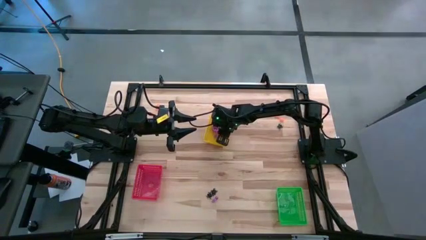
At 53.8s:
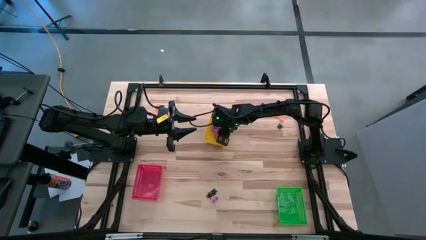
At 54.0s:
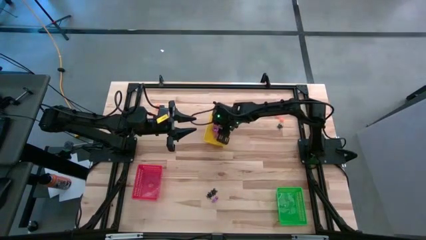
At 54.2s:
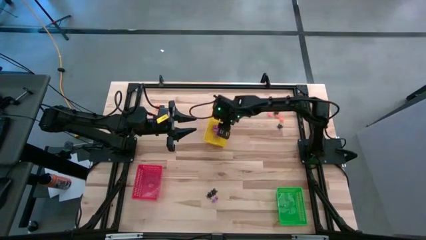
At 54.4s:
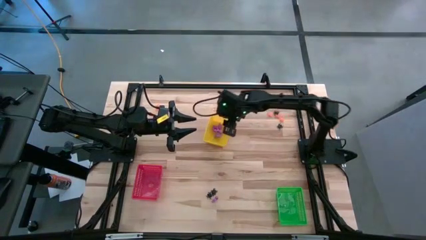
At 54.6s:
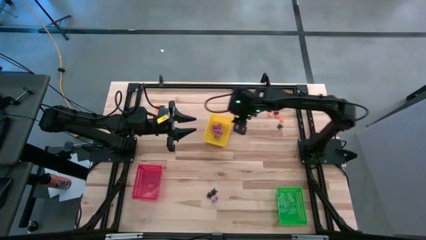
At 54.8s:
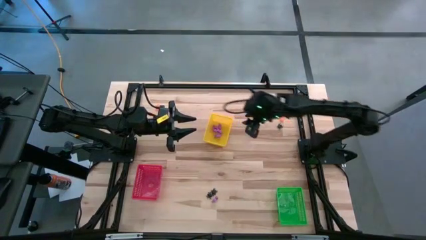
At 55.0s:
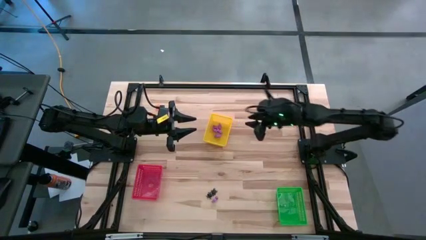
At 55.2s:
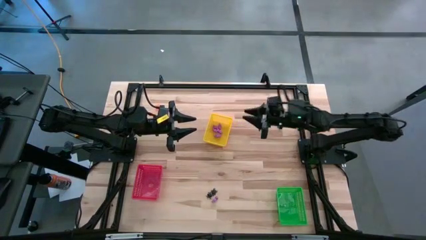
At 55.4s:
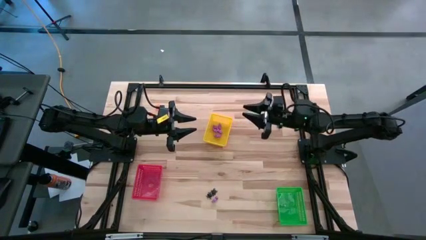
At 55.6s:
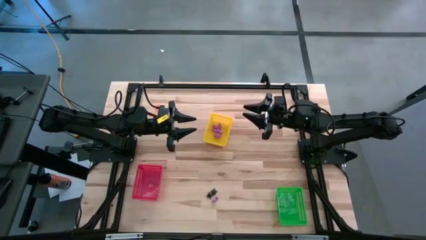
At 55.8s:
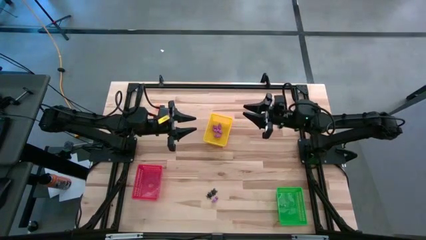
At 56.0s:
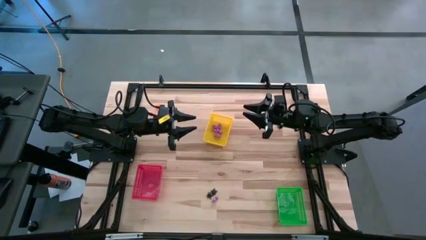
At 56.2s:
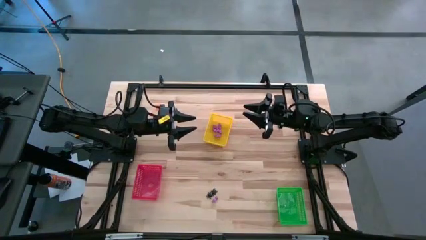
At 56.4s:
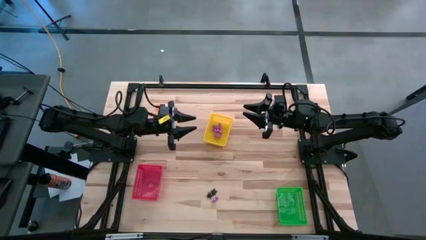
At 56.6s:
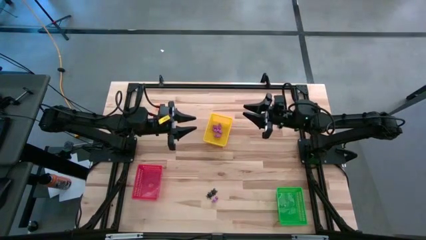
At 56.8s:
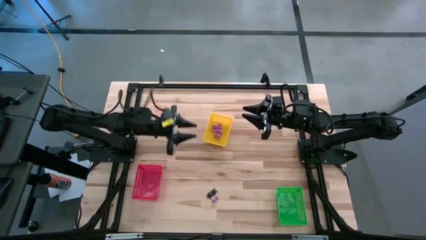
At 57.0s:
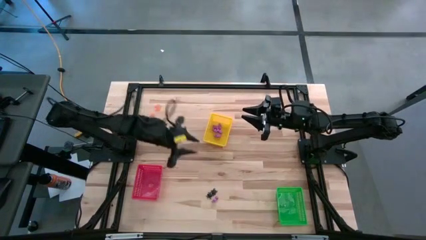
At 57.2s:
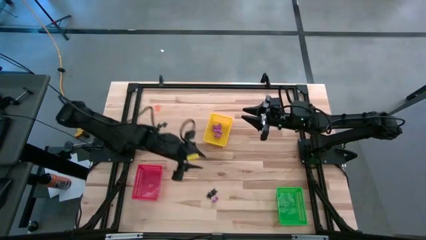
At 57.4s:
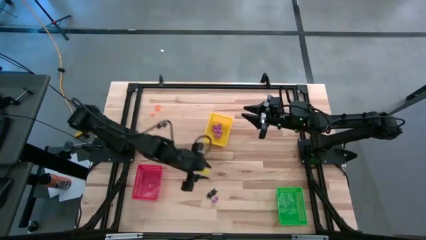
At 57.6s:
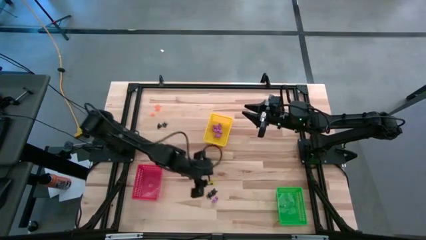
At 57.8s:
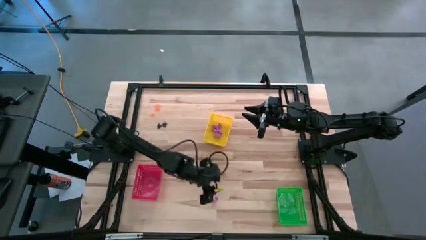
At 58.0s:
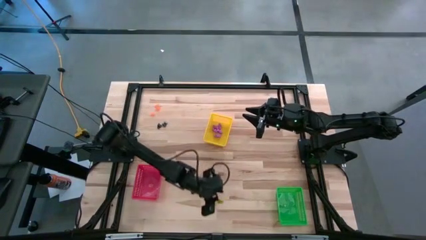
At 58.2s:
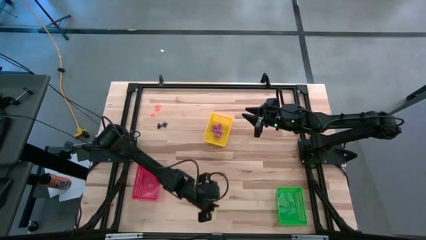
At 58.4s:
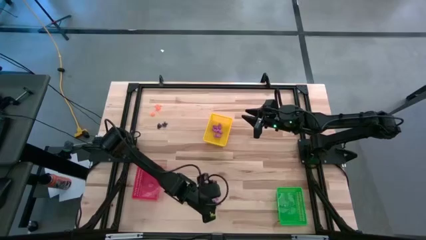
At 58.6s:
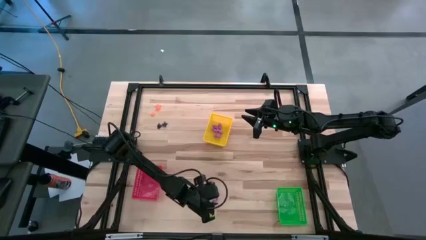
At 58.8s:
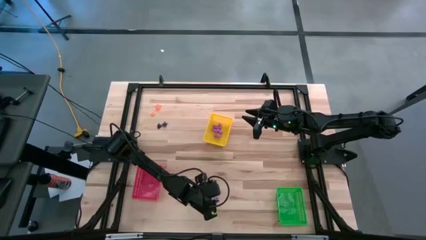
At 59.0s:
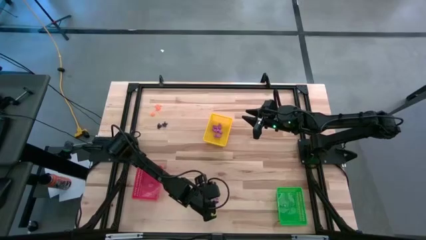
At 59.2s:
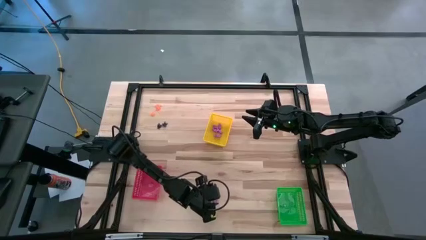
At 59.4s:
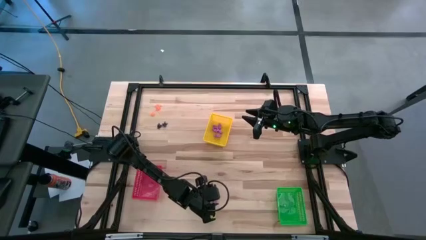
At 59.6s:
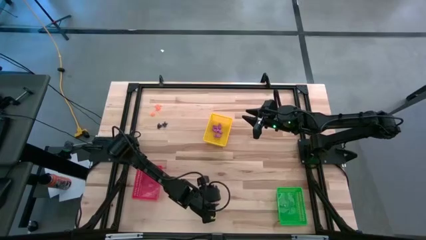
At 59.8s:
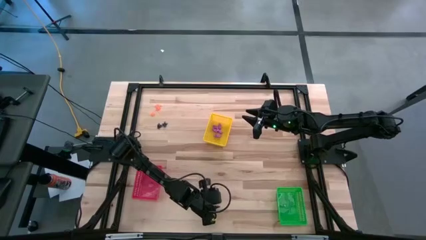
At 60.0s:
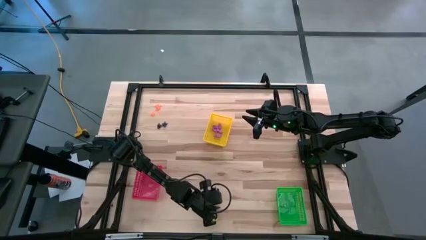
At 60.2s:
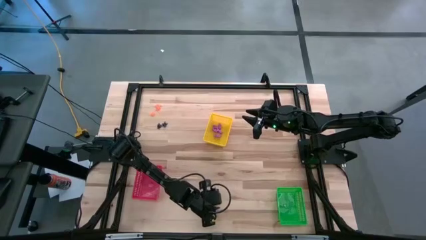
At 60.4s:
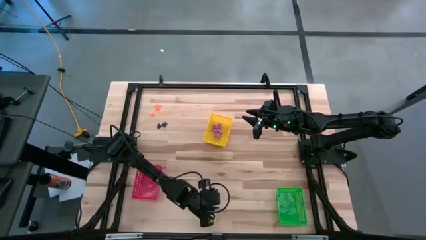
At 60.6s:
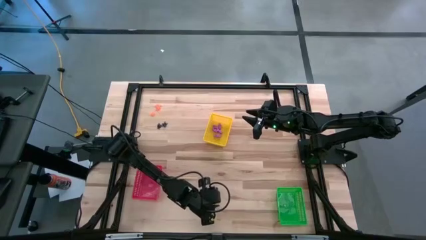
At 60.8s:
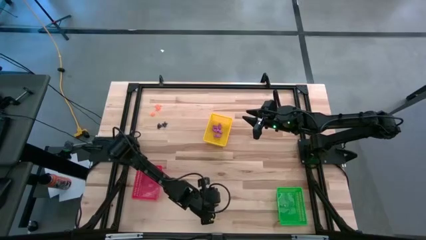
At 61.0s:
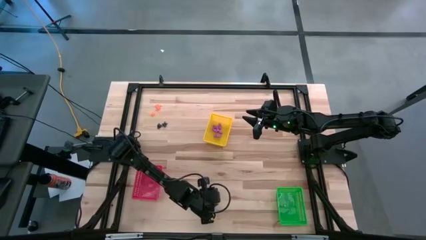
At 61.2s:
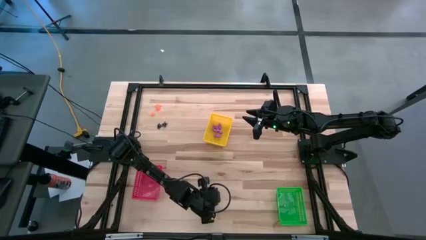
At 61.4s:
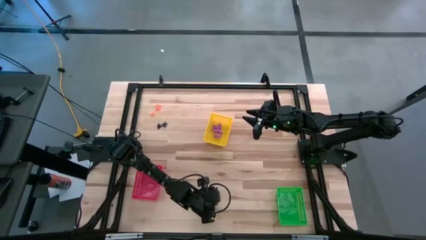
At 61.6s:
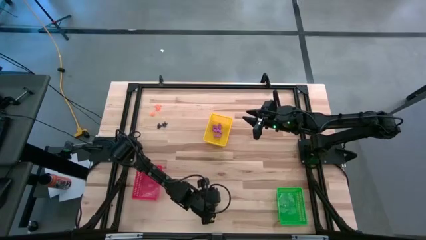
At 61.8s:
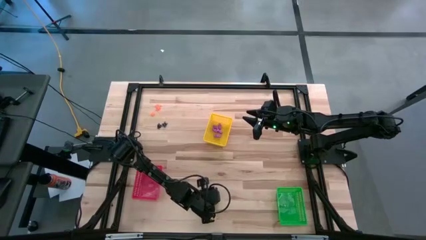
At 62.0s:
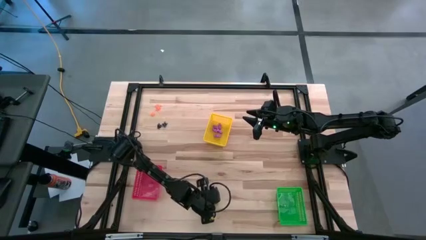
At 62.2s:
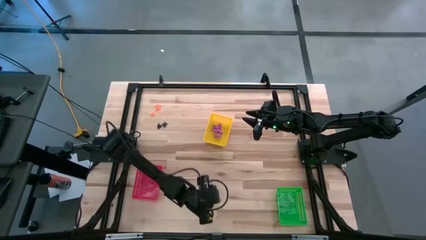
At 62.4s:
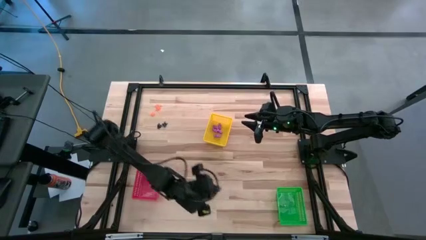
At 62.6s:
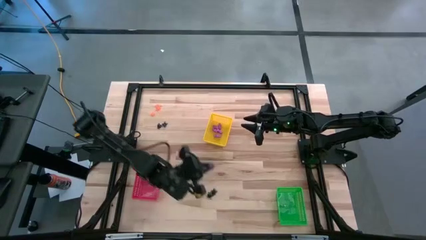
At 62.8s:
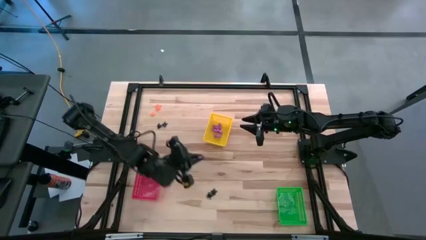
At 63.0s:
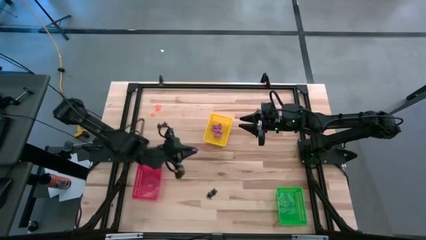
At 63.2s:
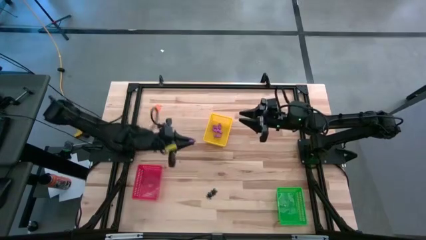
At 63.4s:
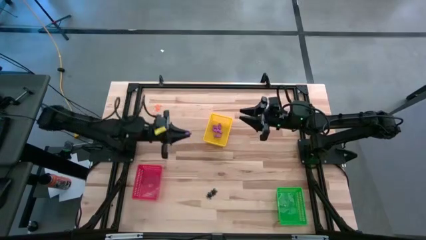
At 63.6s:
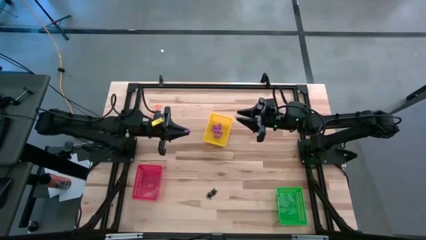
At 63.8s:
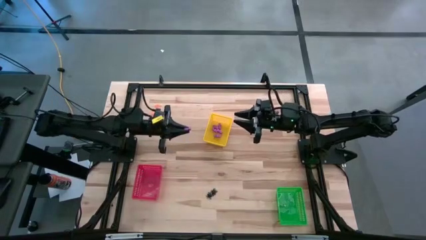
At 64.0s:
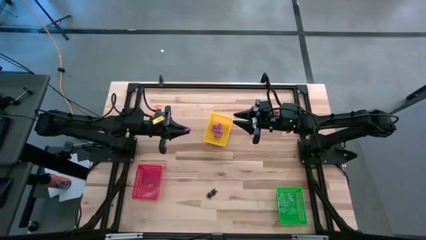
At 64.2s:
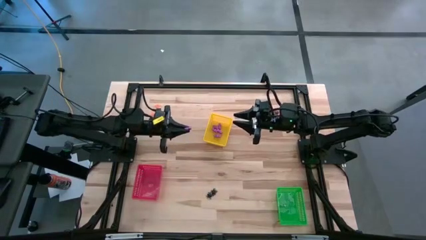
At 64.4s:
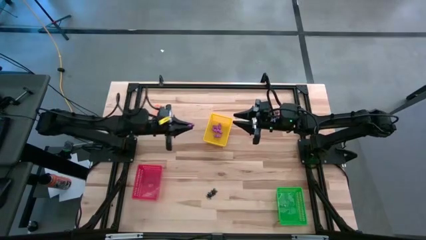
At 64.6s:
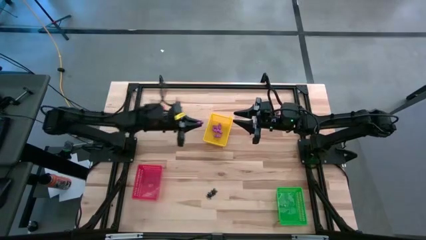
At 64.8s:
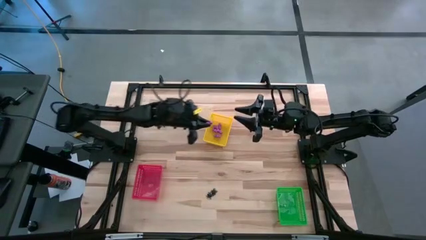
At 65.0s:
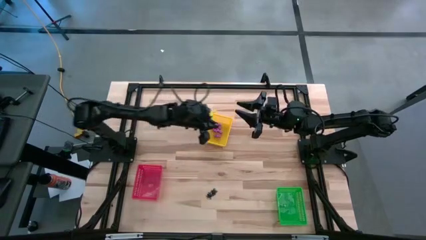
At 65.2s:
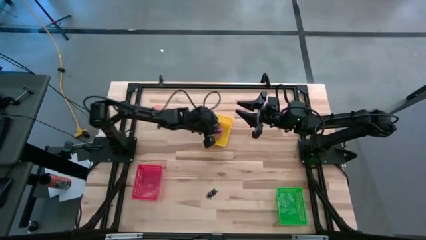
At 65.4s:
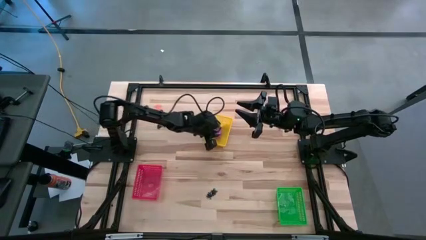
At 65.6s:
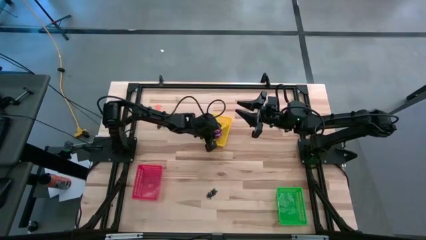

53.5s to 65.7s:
Task: Sort Halloween decoration
Put the skeleton toy into the yellow bin
